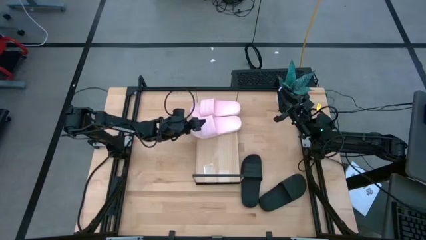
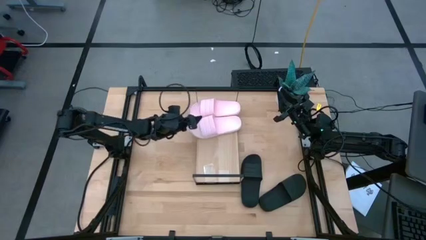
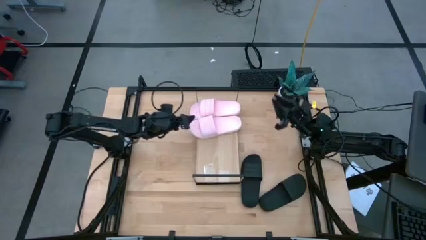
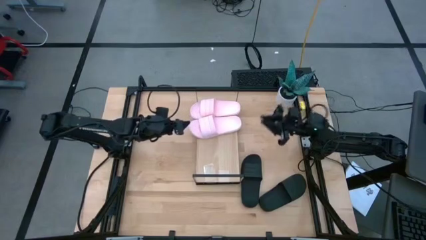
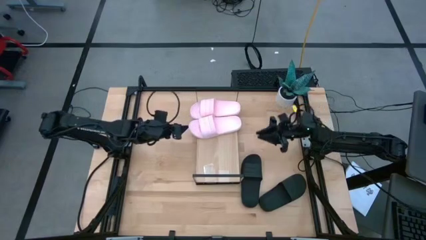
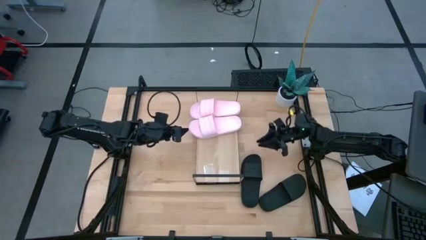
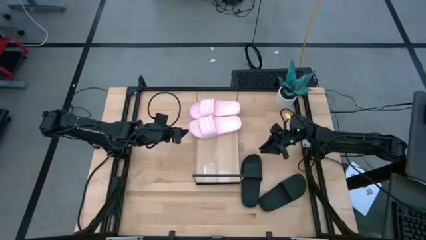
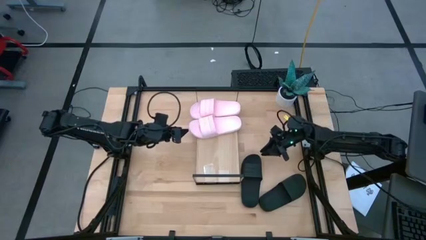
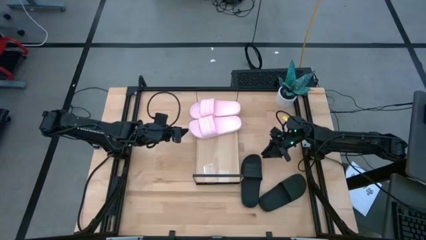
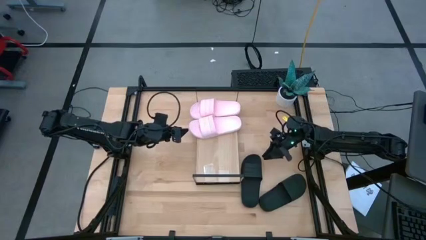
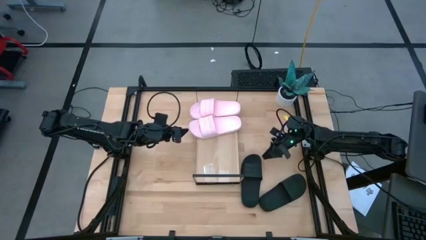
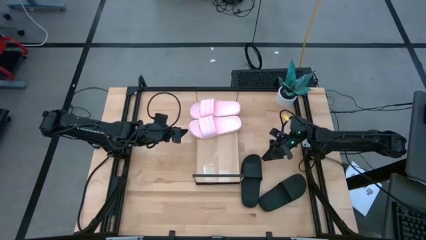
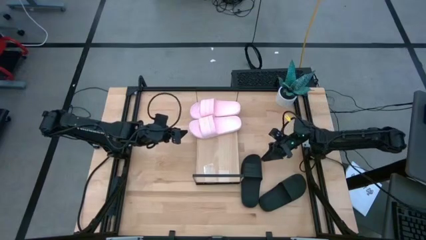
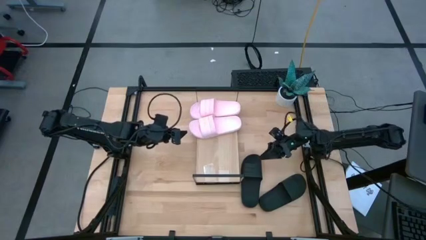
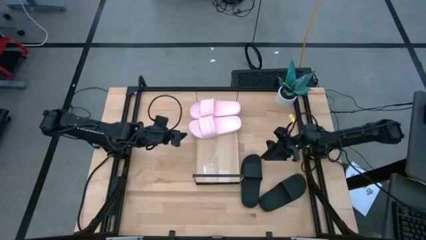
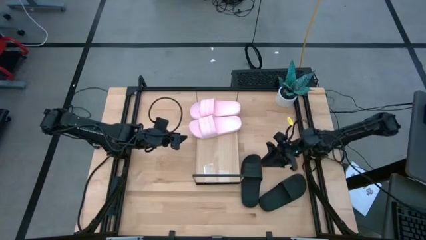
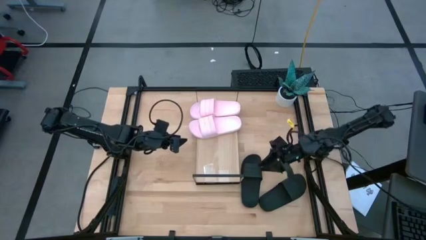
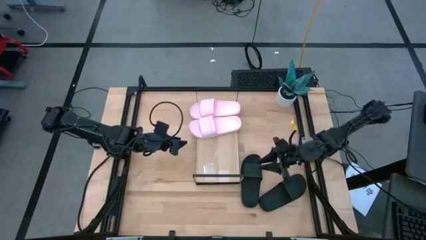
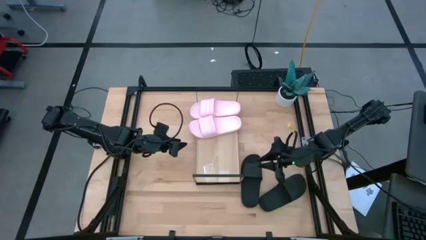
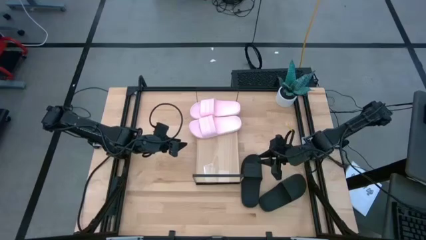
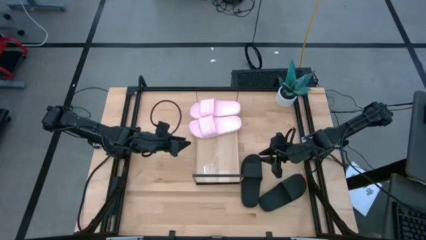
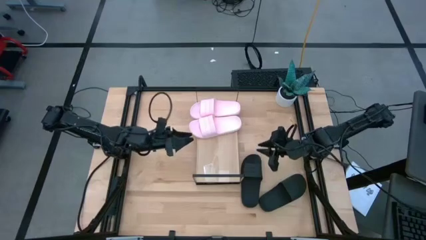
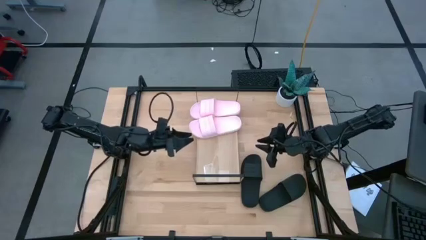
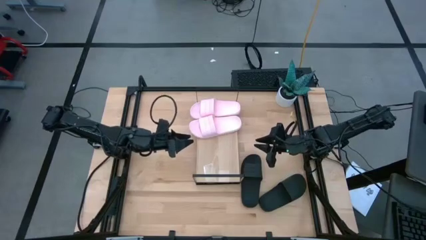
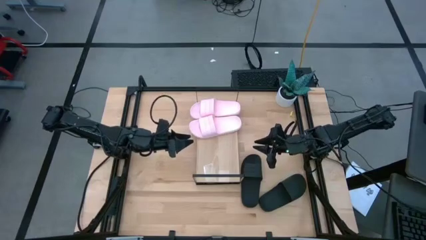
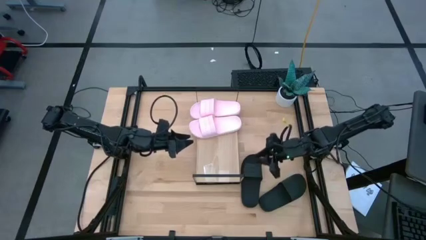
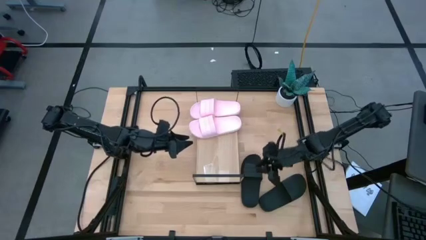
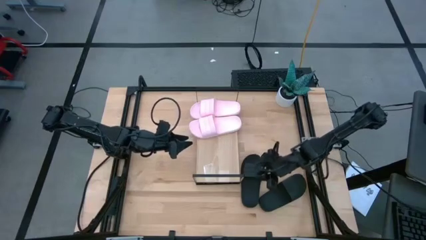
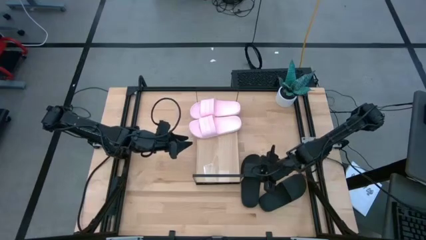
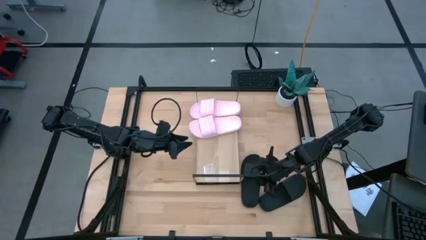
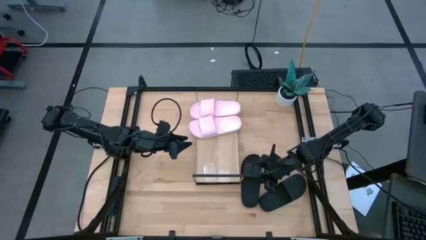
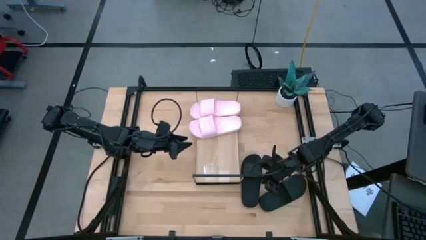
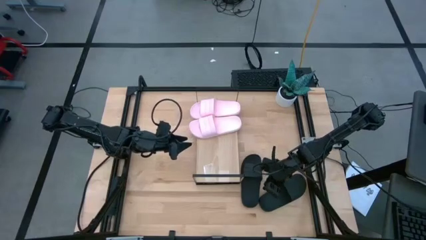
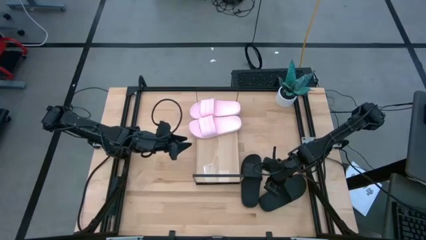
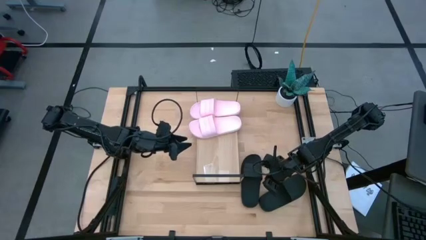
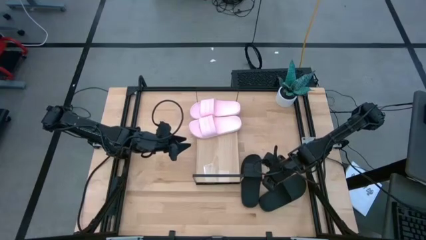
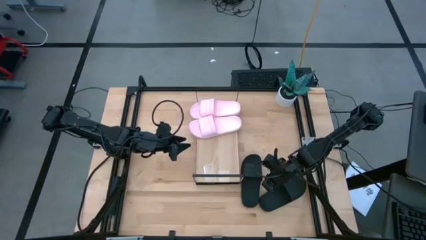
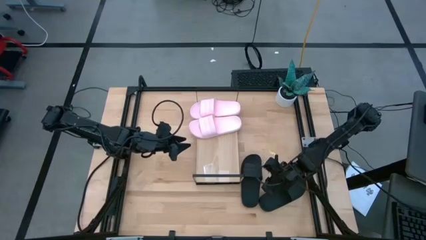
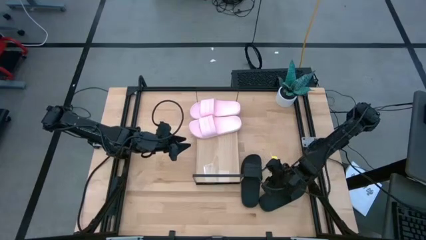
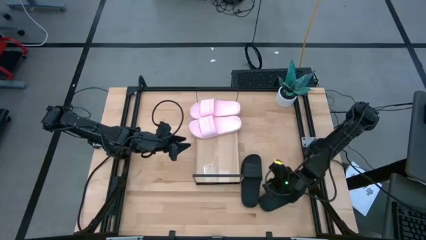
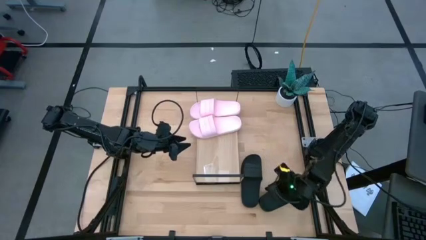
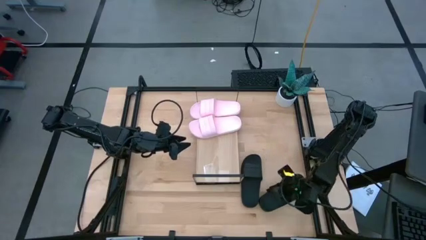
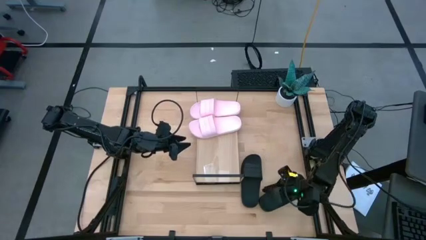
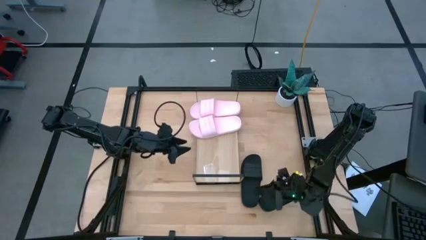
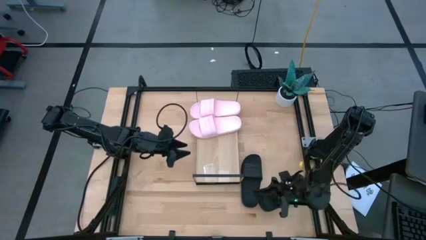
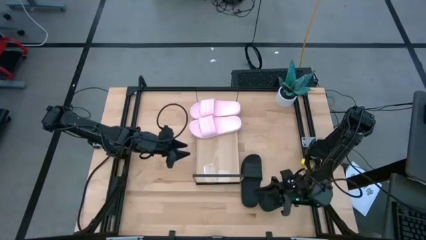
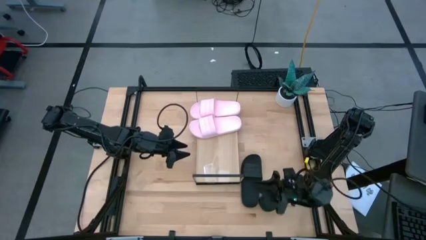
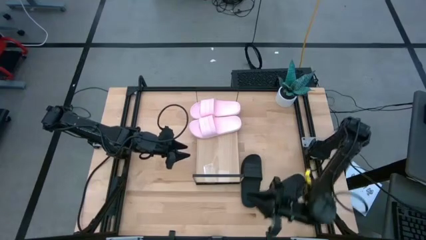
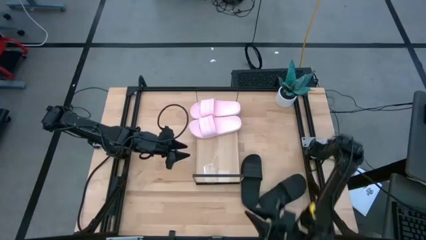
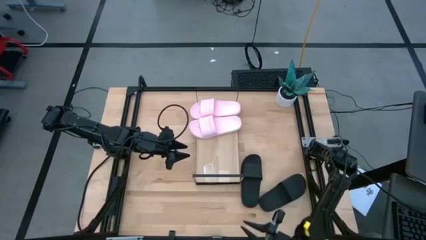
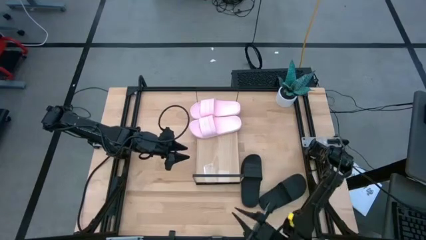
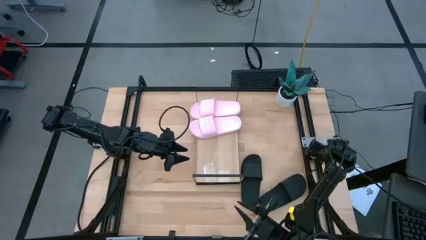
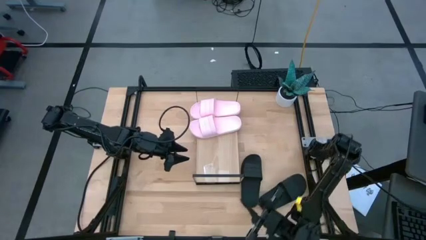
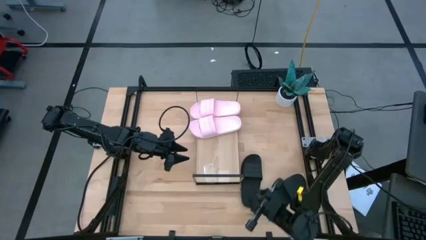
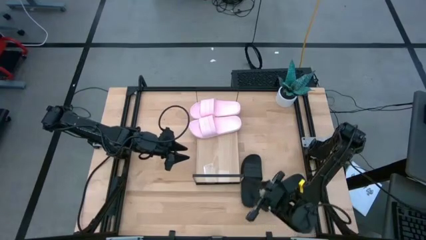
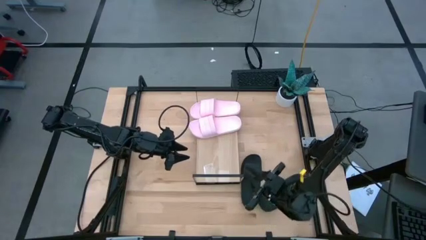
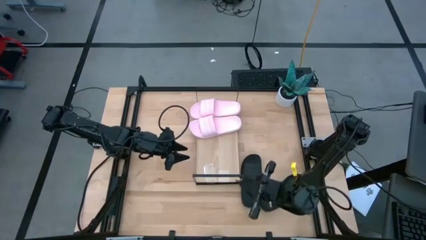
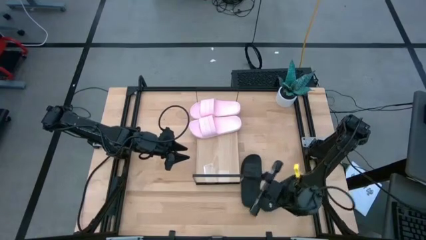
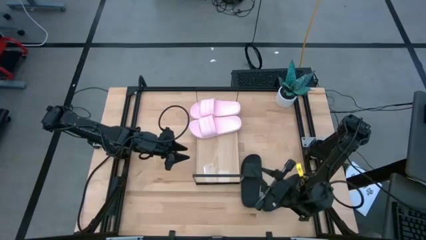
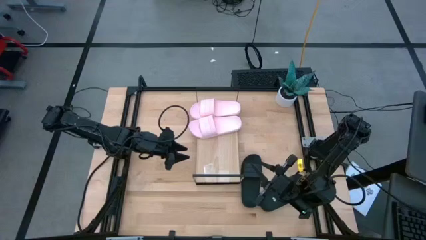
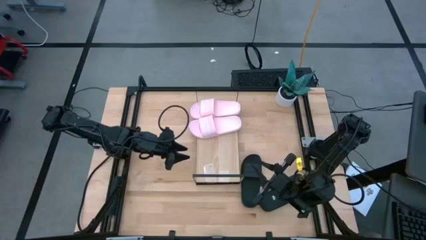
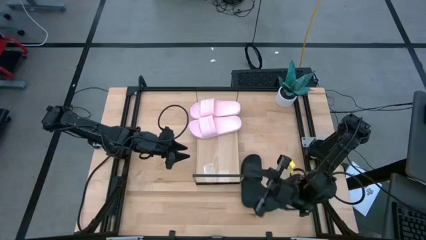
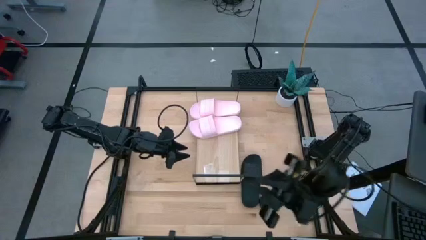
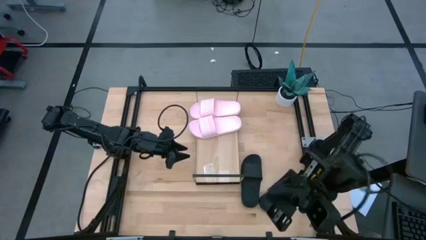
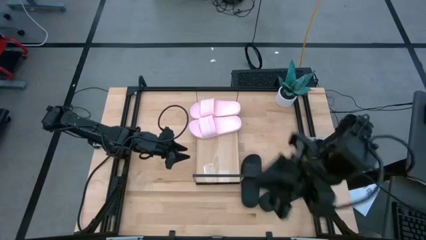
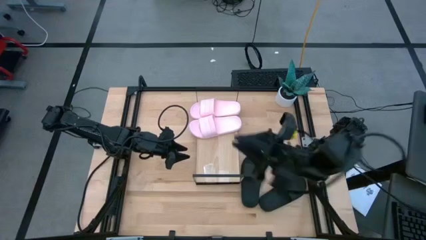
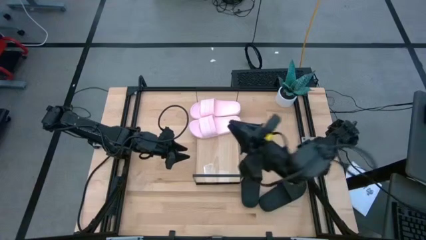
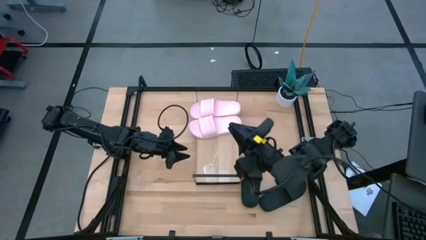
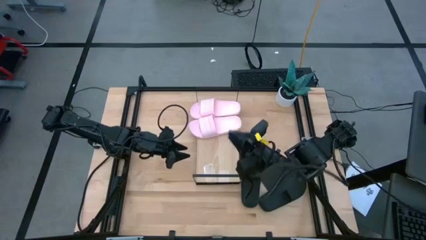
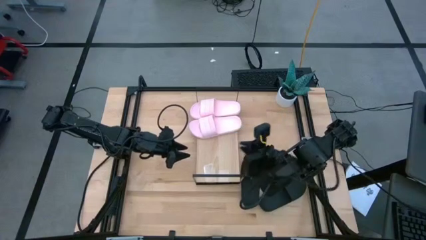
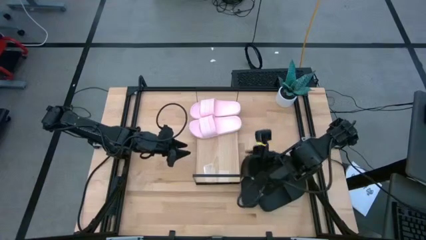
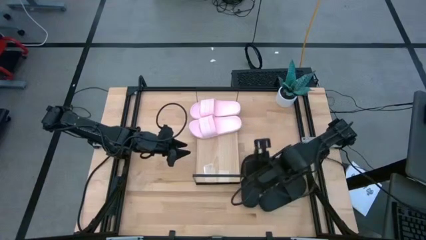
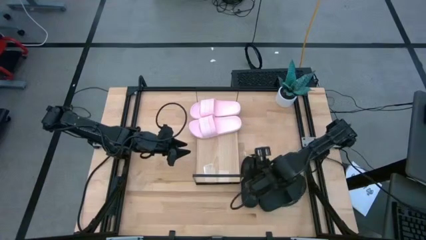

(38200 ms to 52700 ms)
Task: Pick and place slides into the shelf
Put the left black slide on the shelf
